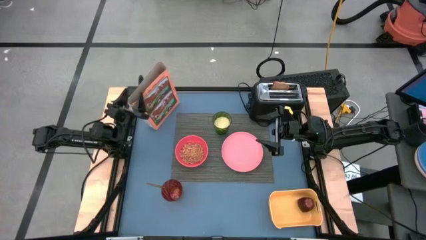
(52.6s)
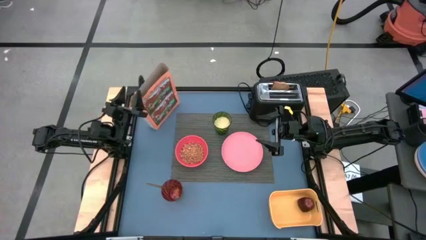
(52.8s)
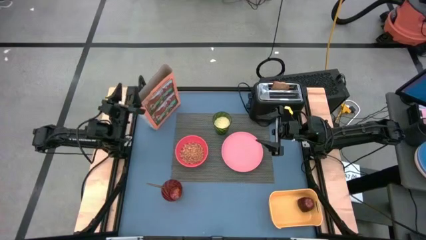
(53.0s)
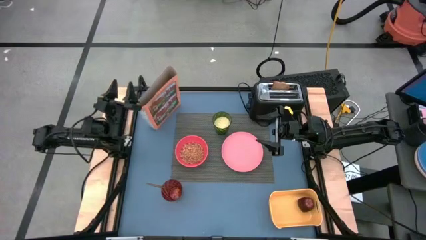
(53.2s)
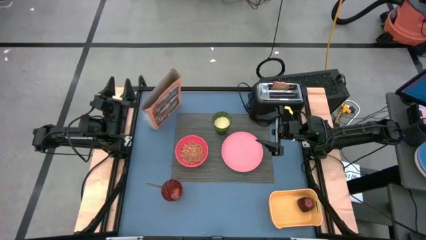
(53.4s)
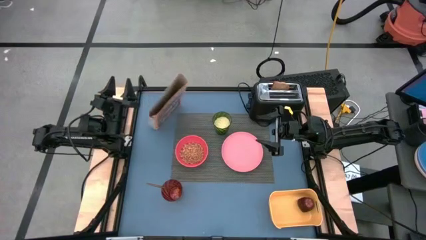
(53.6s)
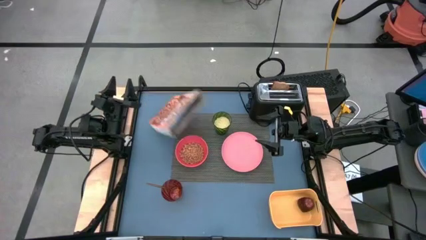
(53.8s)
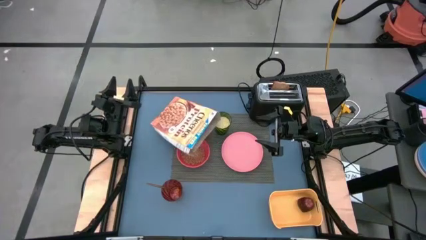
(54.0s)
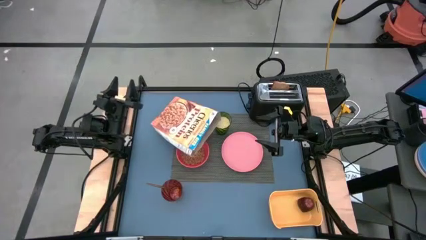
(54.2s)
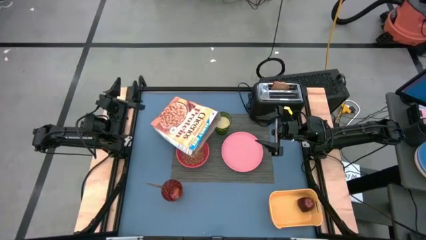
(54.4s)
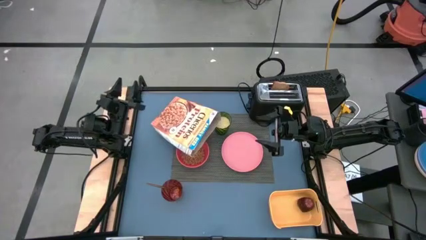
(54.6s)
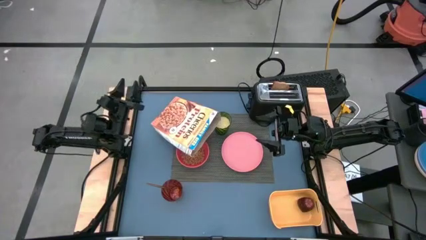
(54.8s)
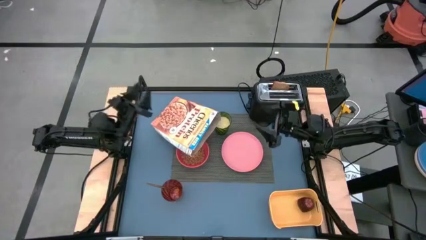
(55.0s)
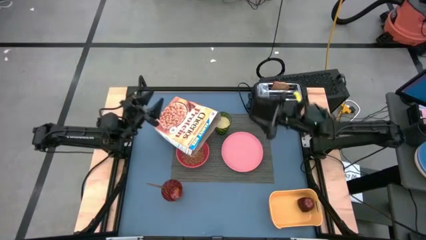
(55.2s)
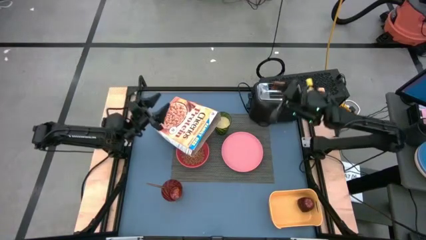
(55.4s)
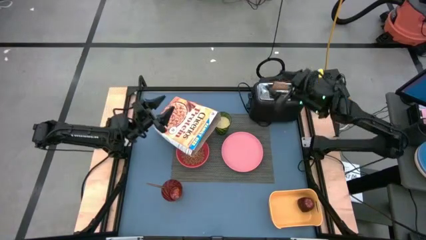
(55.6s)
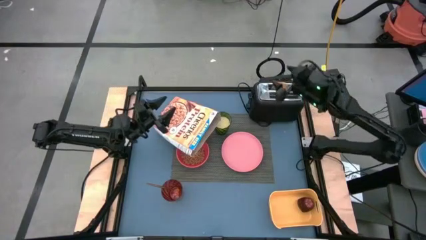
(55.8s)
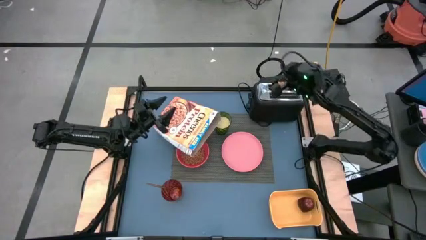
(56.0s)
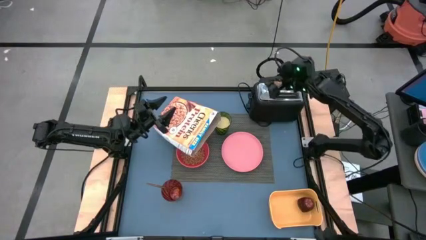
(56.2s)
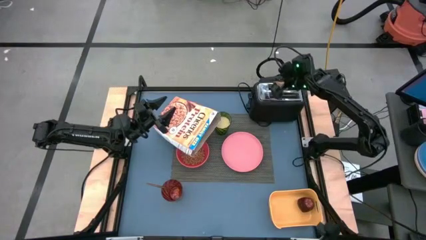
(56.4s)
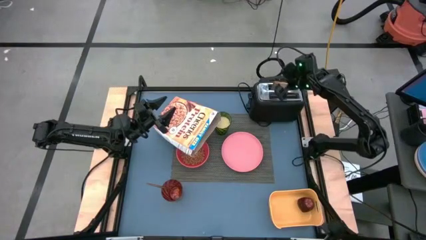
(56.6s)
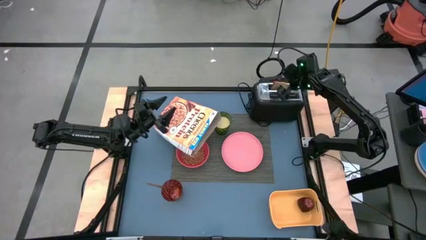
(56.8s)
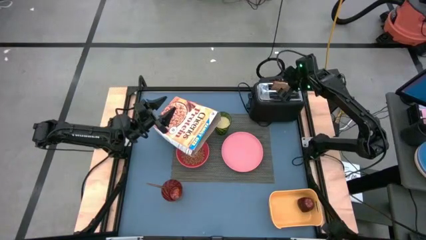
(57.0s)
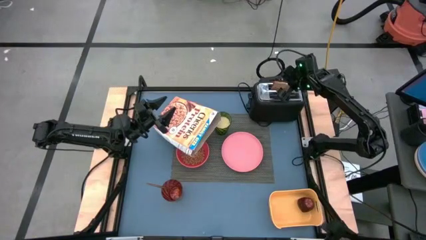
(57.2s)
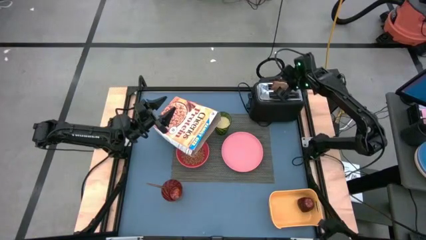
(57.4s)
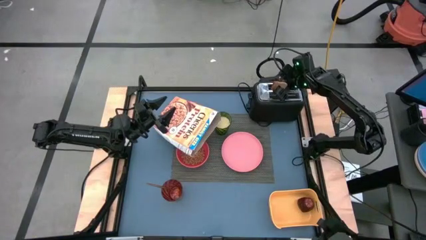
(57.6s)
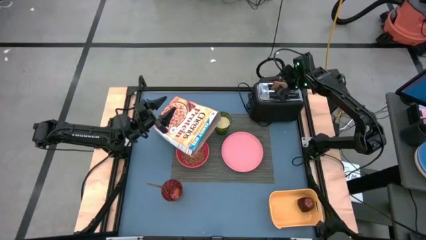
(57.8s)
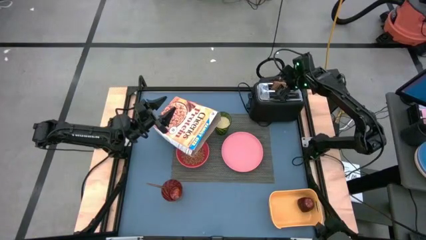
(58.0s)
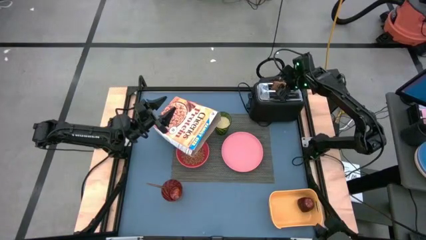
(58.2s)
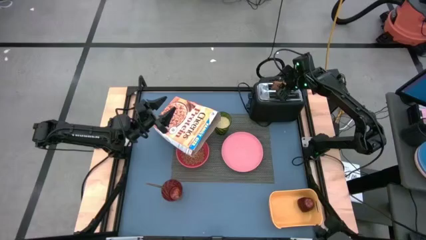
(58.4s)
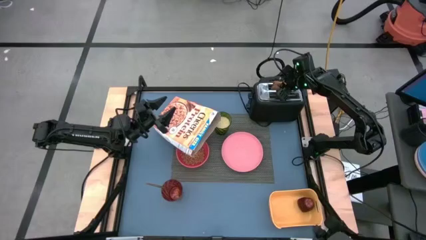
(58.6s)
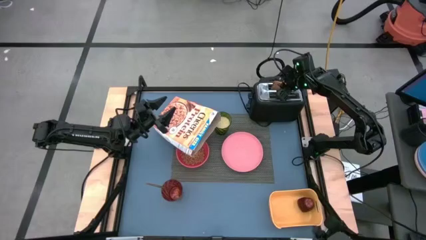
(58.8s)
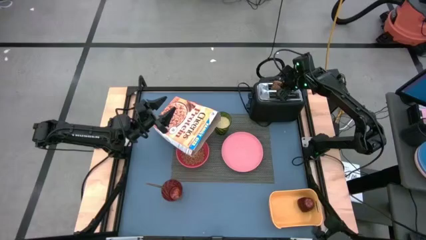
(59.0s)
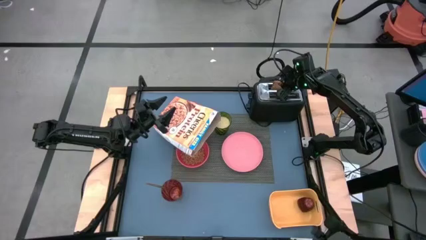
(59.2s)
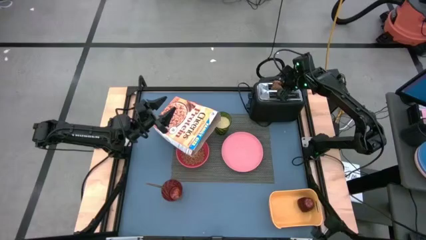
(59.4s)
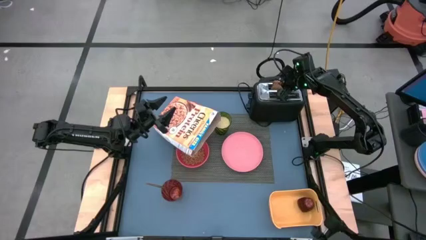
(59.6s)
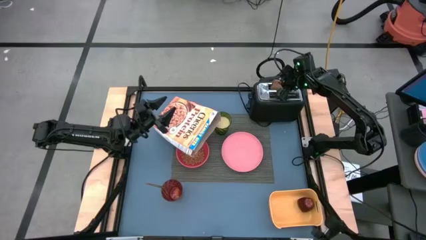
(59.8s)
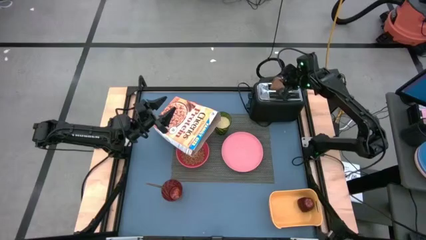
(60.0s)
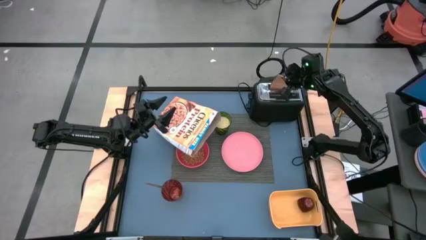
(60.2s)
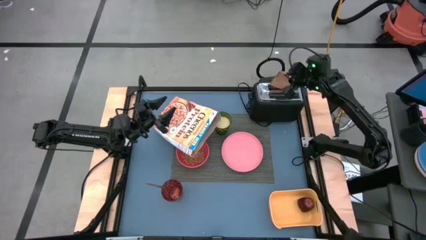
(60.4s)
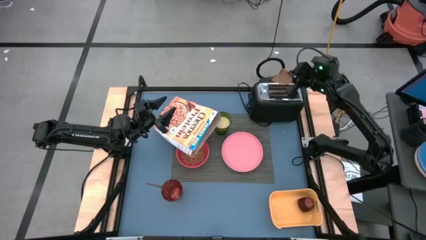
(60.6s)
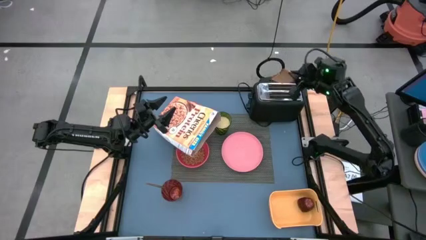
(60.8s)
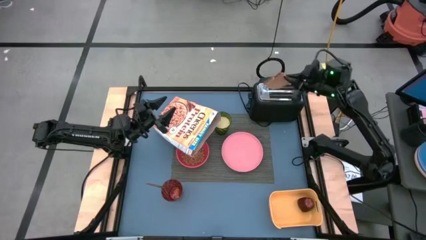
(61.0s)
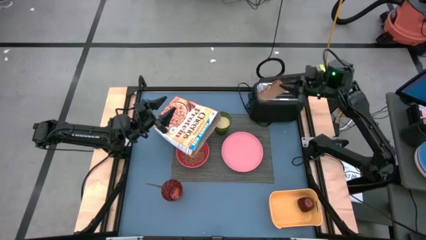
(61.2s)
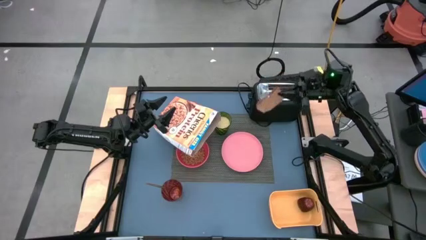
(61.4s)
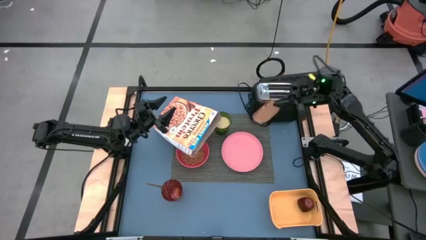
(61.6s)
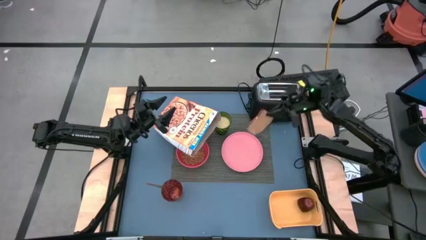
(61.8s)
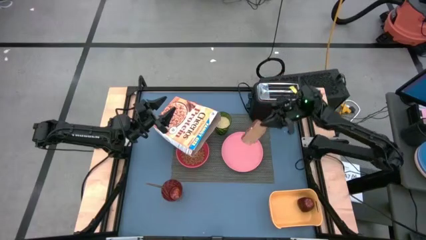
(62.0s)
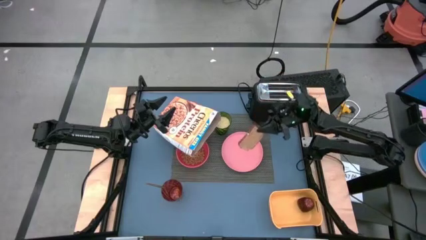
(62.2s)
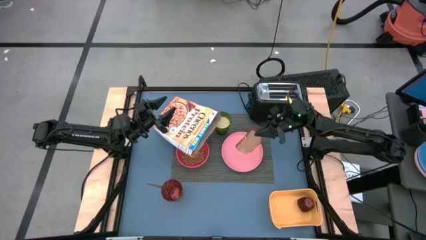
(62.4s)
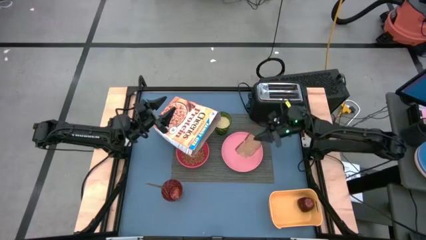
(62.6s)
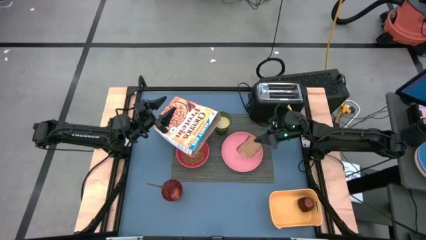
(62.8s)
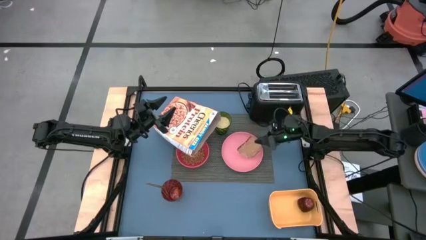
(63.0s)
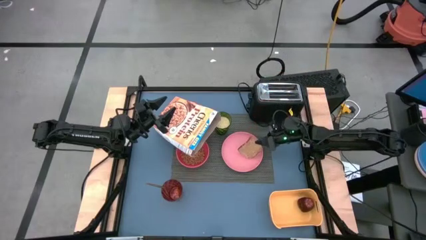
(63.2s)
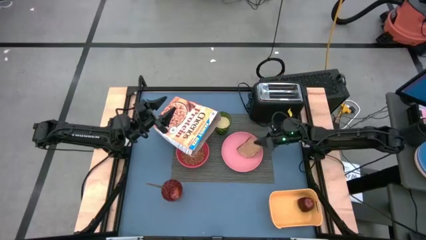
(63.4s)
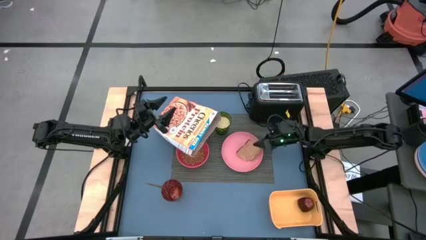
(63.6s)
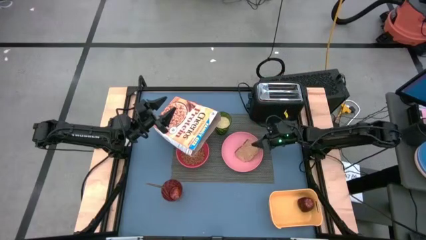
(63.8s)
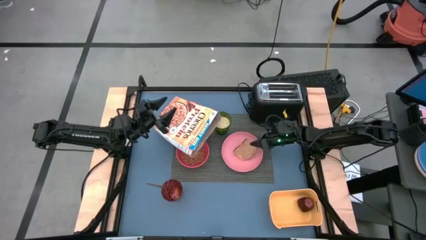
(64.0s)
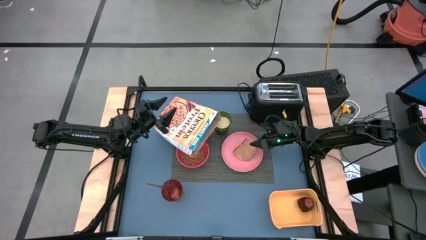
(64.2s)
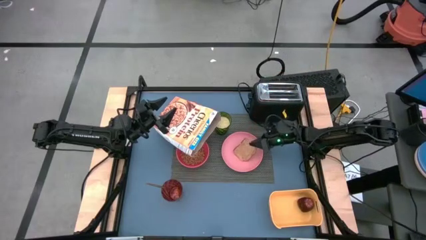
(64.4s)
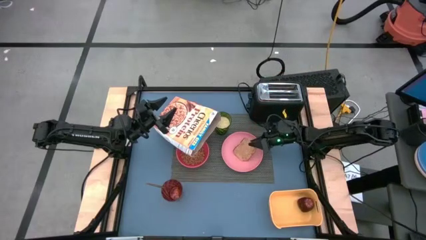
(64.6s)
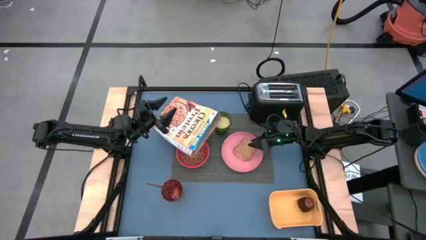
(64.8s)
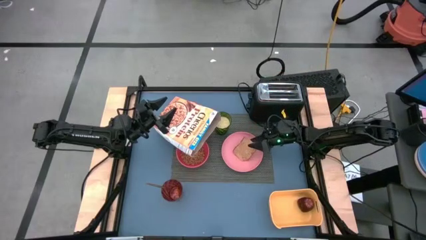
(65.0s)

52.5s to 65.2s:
Task: Arrange a breakfast setting
Put the toasted bread from the toaster onto the pink plate
